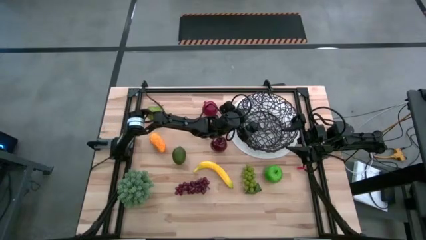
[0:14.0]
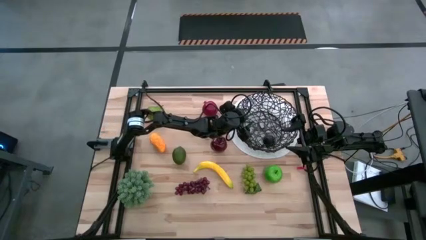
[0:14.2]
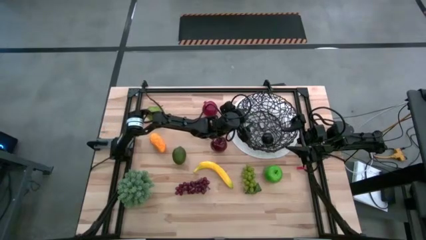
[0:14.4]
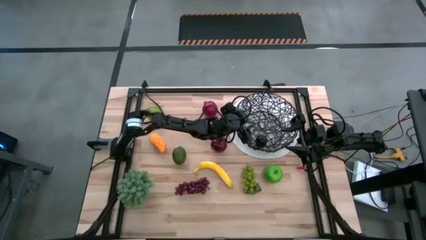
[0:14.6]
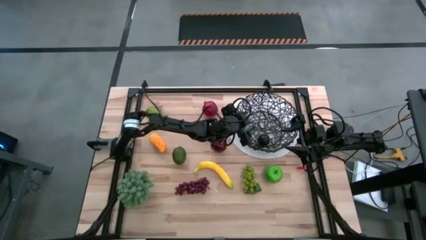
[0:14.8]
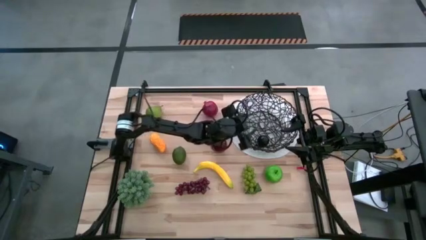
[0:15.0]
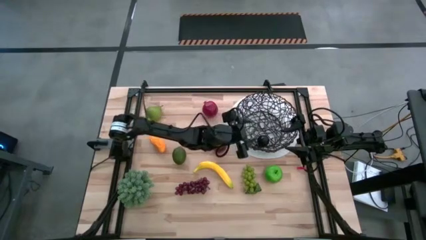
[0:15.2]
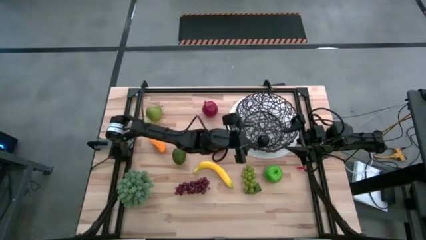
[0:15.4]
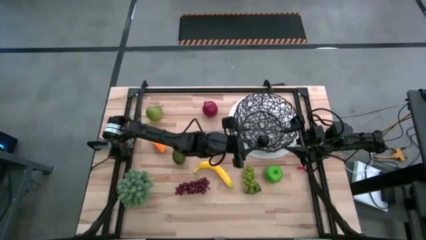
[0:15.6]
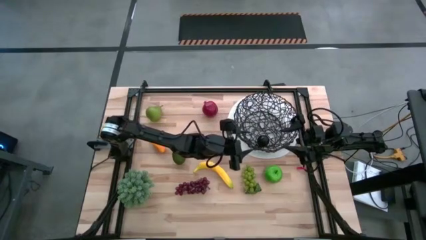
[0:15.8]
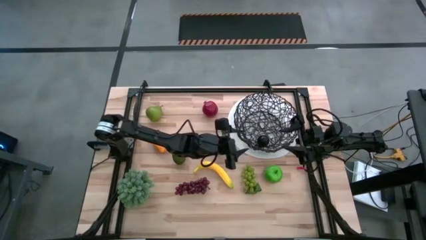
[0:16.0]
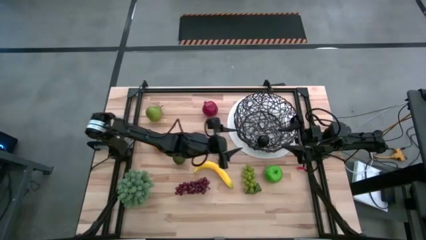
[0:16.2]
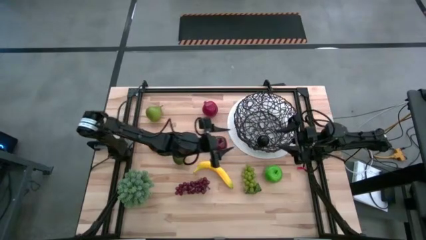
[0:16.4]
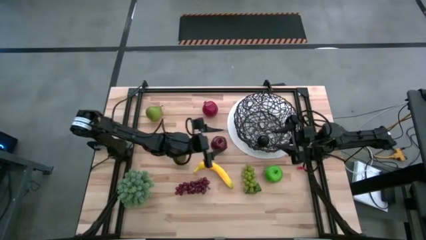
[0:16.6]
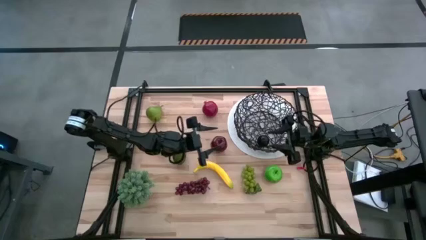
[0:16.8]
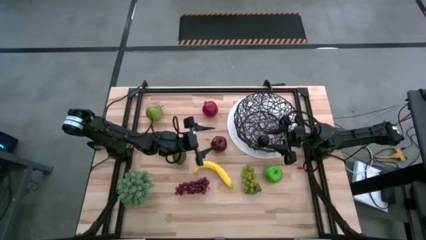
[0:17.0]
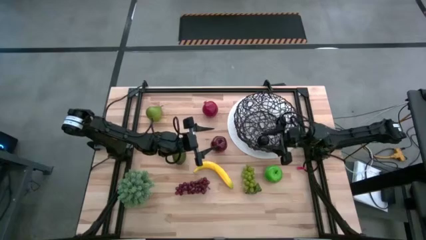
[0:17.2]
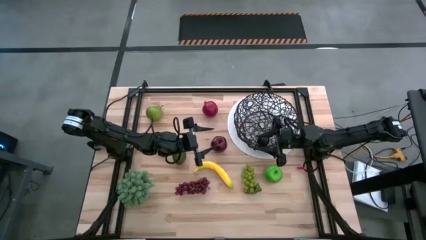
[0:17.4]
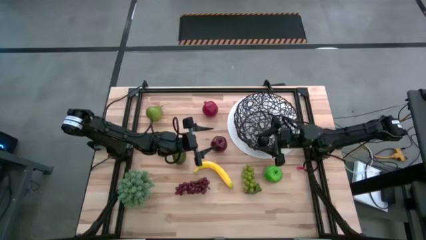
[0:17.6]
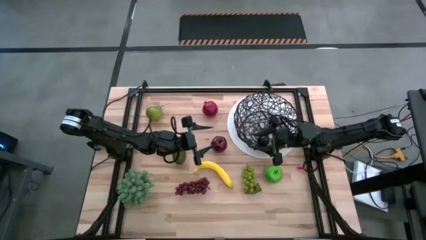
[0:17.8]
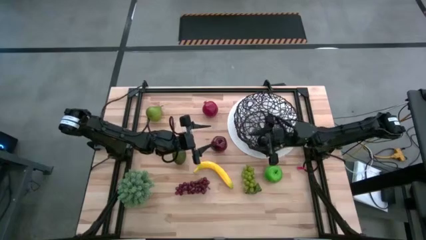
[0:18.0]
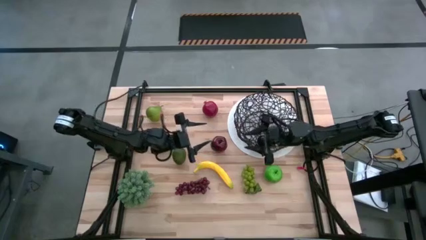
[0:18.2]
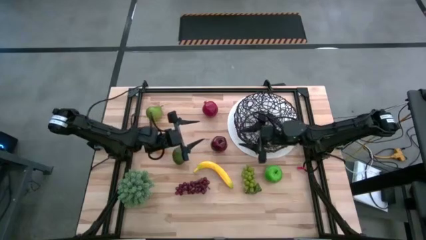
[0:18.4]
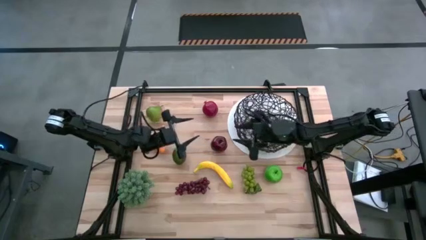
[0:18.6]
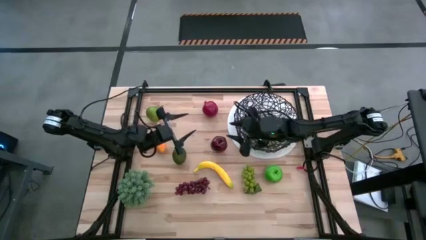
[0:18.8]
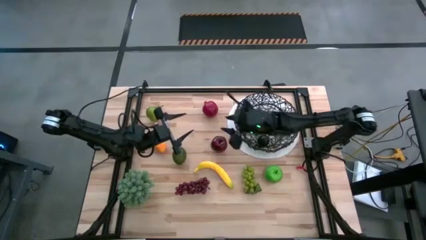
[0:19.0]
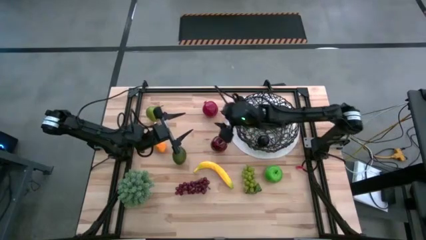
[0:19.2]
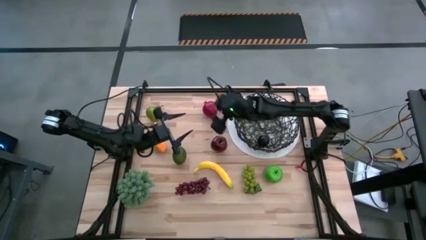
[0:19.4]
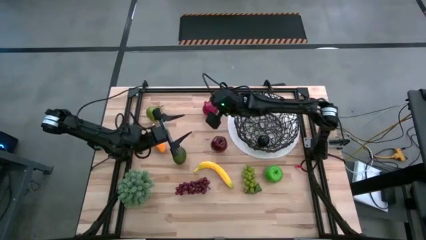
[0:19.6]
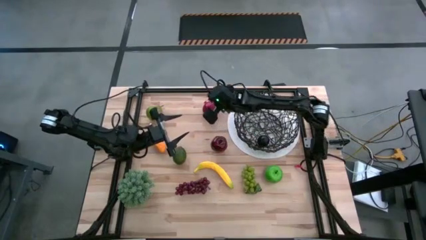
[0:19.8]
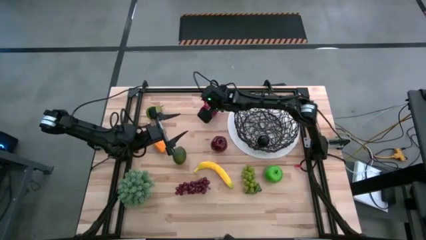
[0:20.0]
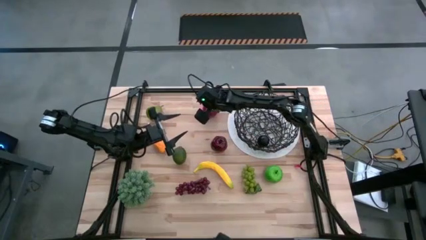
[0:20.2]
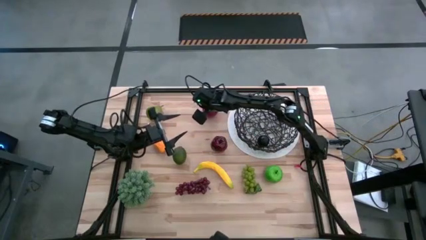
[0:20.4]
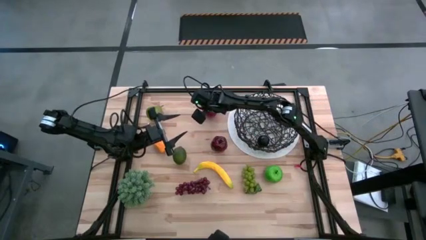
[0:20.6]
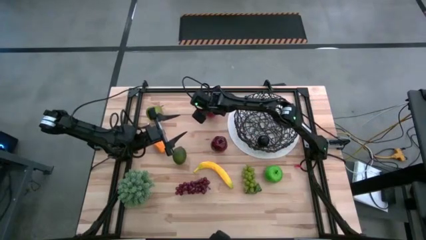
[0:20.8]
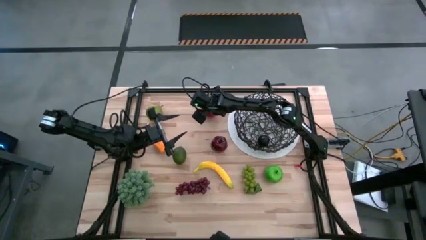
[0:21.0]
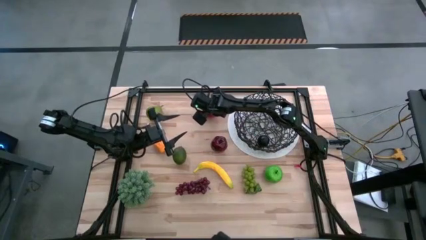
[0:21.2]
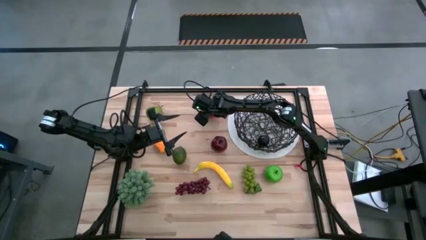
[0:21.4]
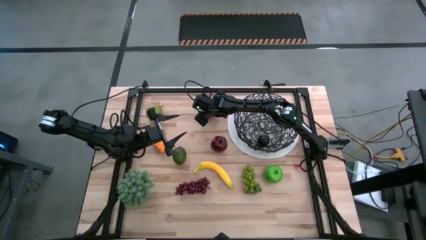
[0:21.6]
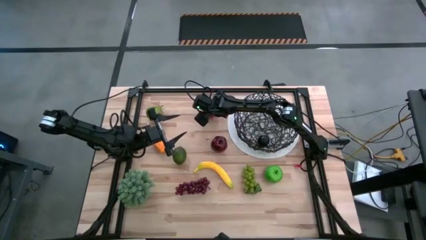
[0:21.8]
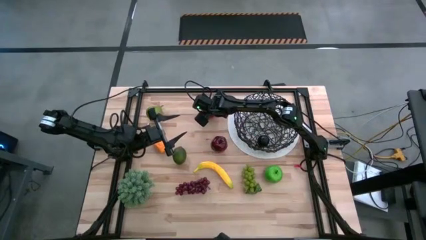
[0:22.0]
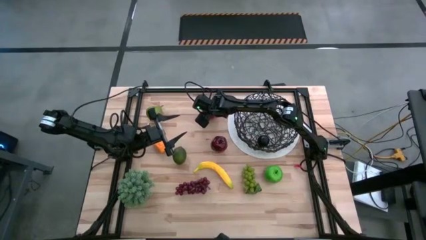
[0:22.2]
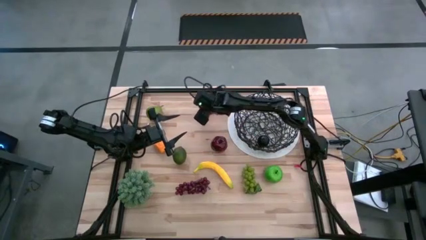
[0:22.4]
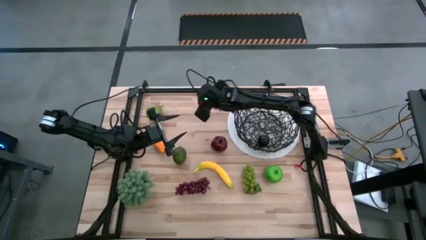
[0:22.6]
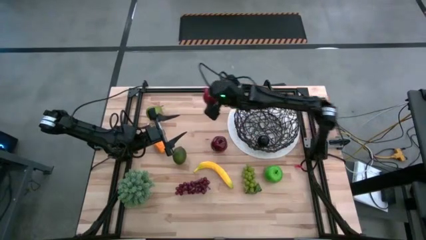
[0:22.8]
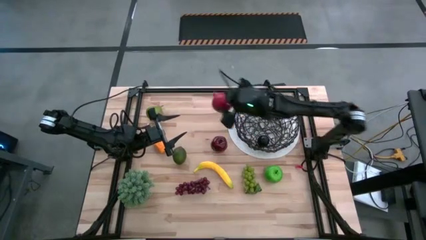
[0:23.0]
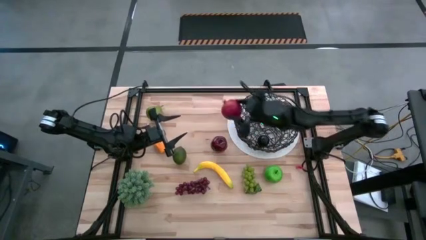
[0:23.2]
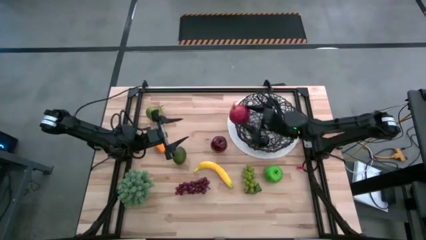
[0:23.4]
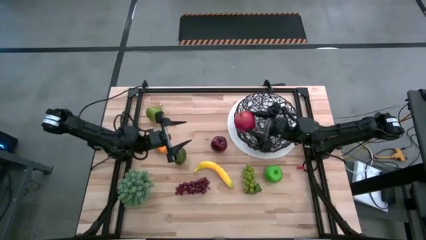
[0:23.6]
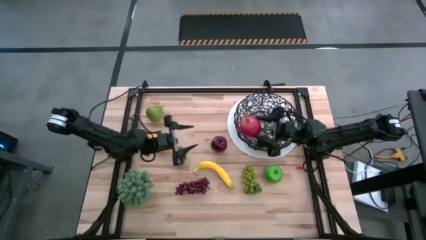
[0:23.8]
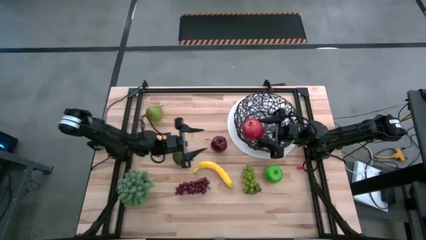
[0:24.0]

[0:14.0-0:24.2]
Task: Build produce basket
Put the red pomegranate into the wire basket

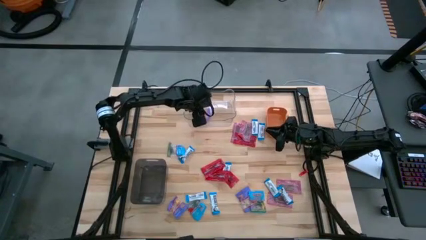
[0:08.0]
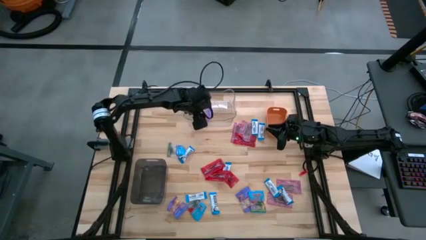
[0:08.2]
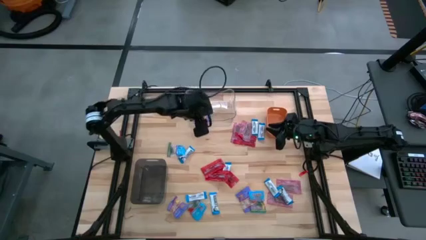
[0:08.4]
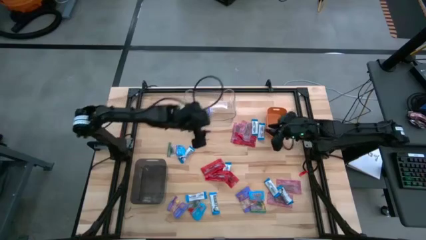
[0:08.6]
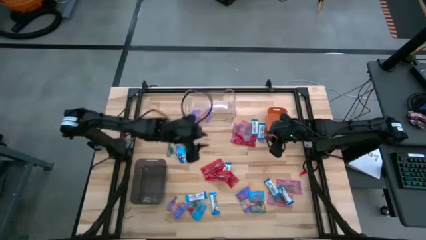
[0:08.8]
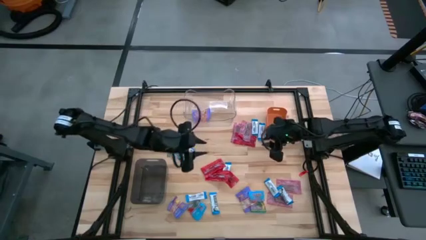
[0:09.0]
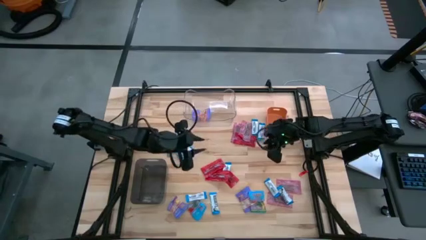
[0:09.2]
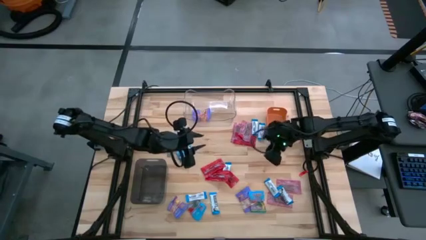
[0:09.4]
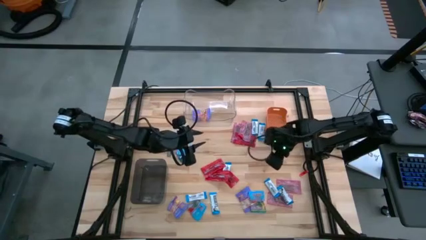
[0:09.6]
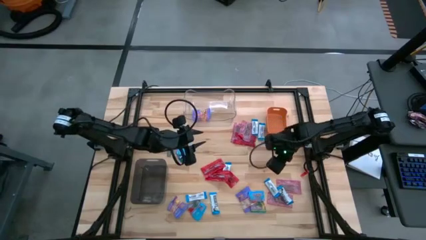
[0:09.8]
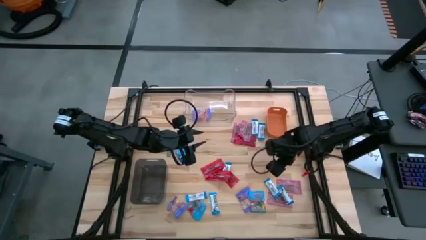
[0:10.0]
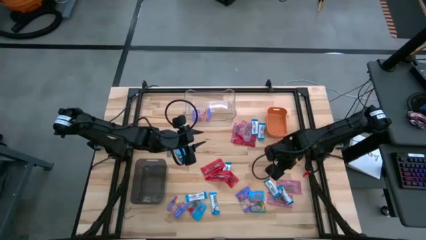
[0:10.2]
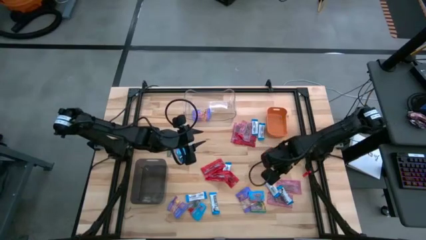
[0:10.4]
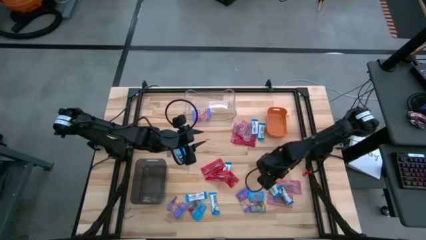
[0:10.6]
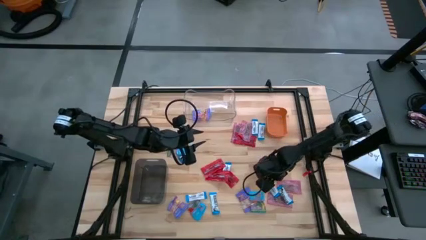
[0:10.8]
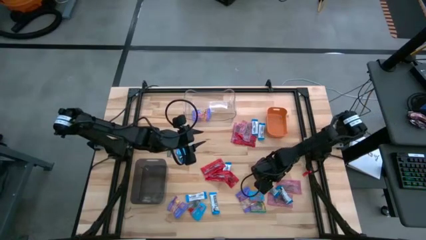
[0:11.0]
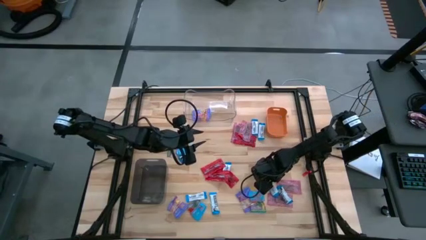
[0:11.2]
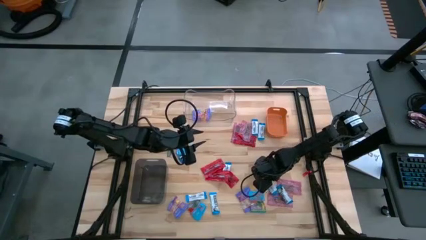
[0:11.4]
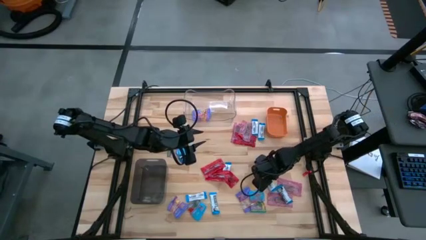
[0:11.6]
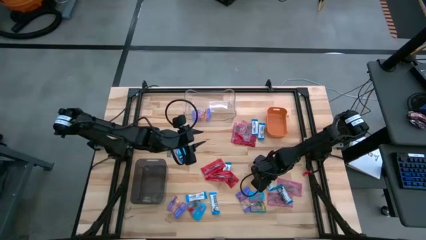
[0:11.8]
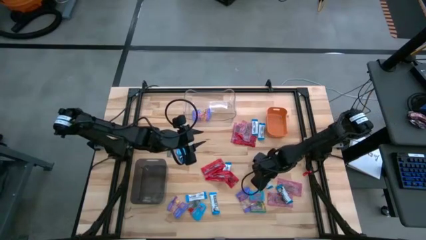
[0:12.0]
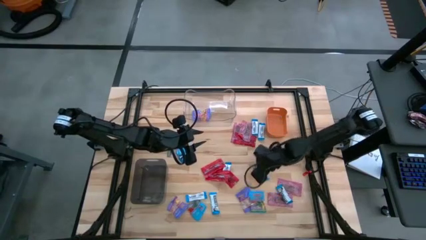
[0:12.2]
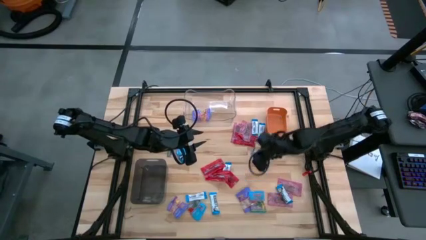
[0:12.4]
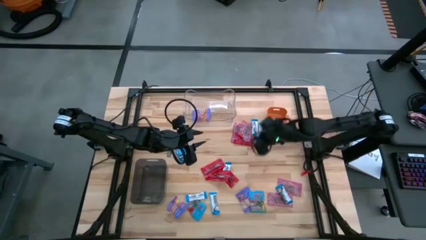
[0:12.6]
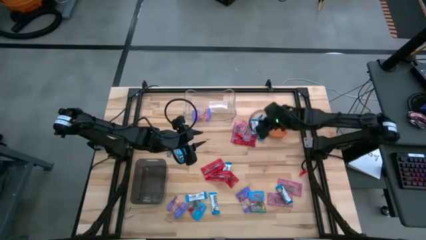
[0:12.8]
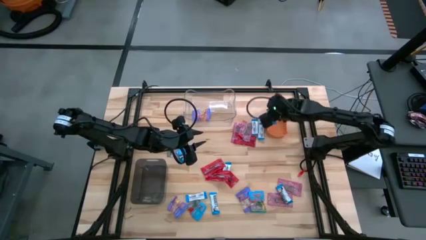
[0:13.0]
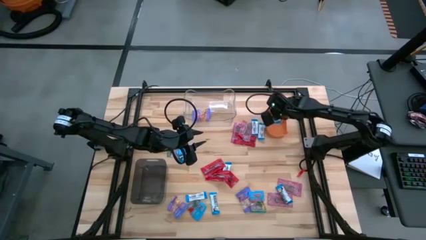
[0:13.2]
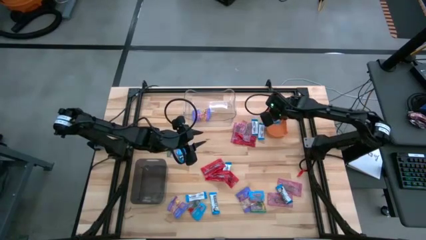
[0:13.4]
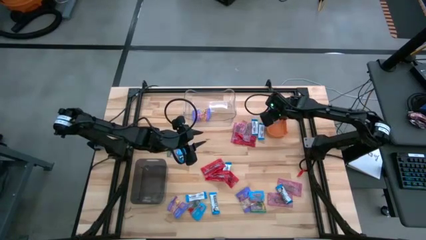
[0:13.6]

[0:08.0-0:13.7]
Task: Sort candy
Put the white chocolate into the orange bin
